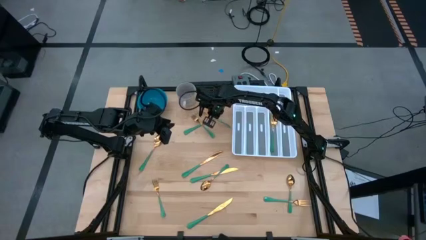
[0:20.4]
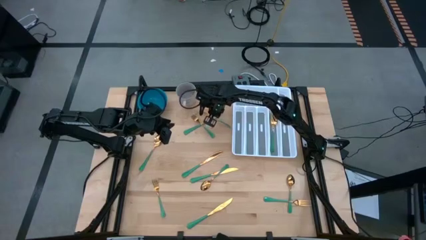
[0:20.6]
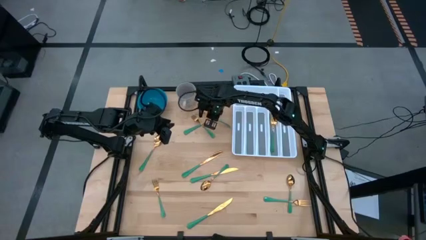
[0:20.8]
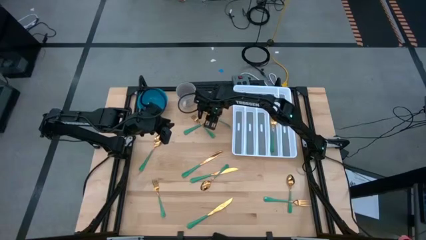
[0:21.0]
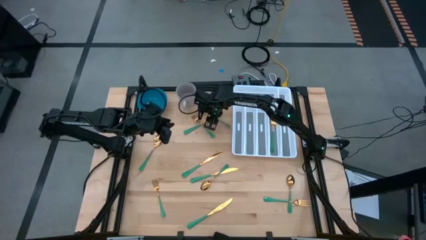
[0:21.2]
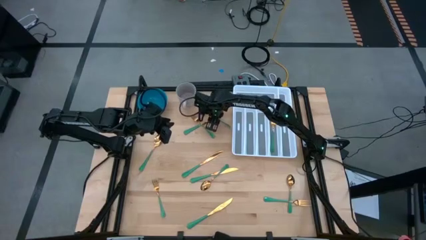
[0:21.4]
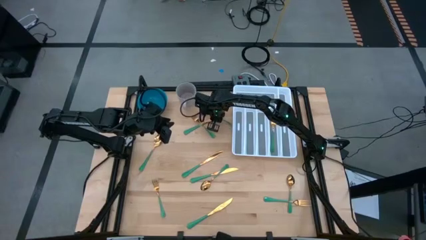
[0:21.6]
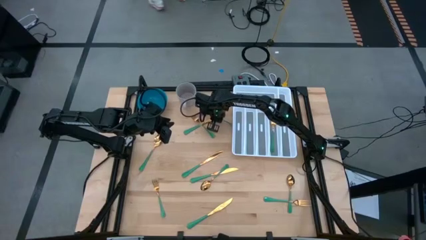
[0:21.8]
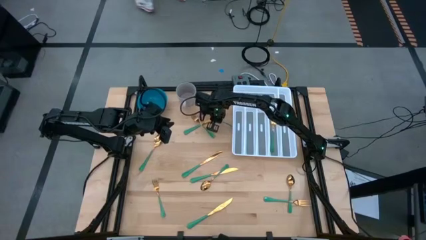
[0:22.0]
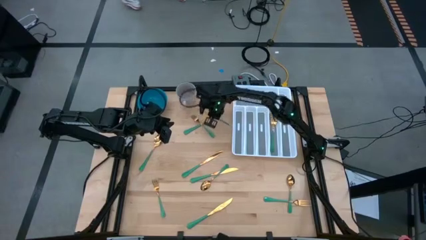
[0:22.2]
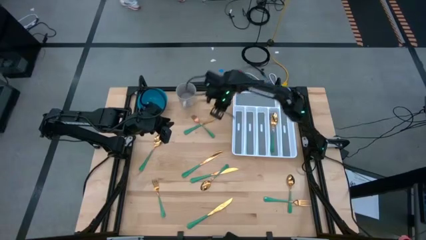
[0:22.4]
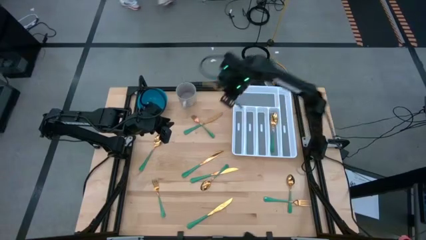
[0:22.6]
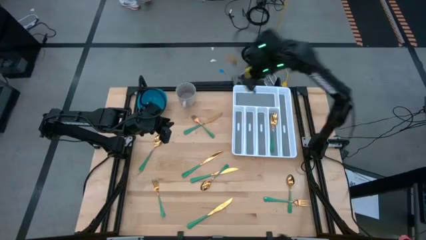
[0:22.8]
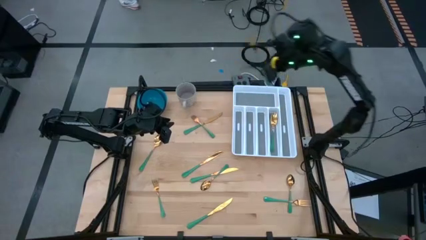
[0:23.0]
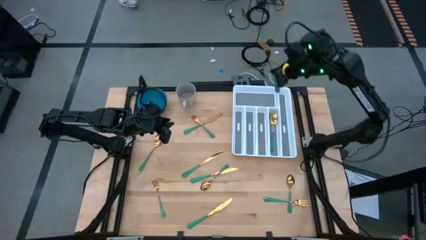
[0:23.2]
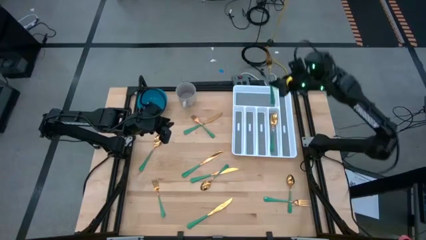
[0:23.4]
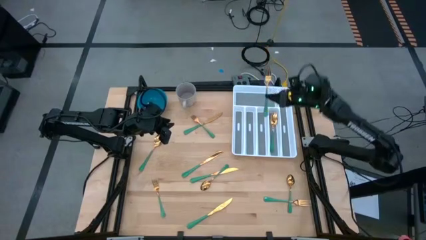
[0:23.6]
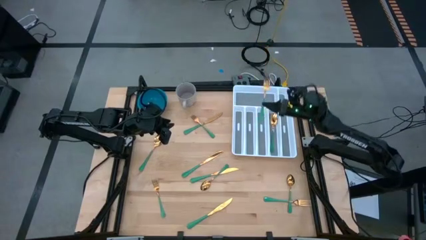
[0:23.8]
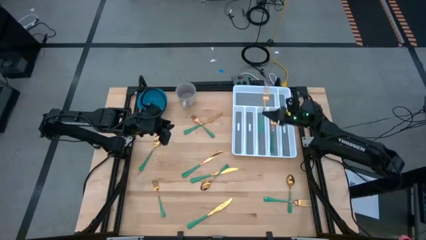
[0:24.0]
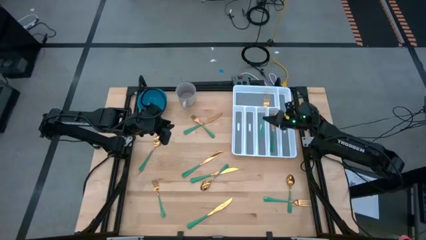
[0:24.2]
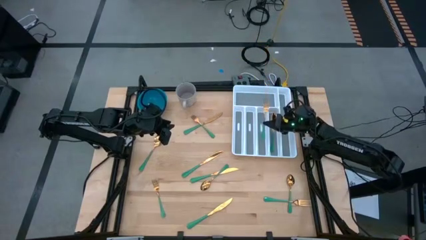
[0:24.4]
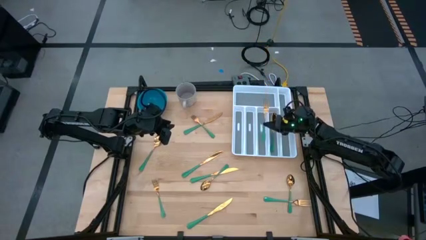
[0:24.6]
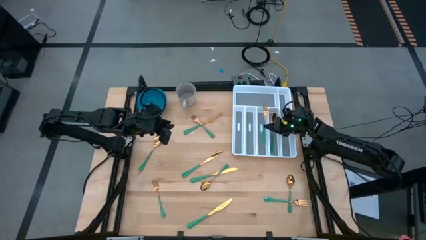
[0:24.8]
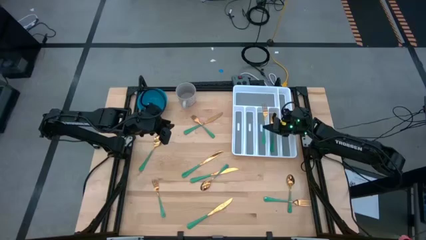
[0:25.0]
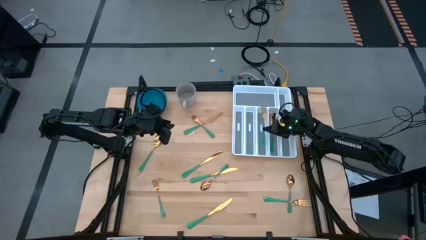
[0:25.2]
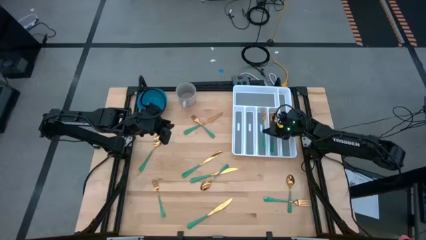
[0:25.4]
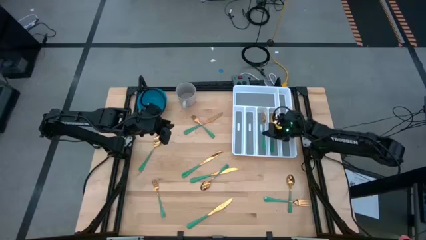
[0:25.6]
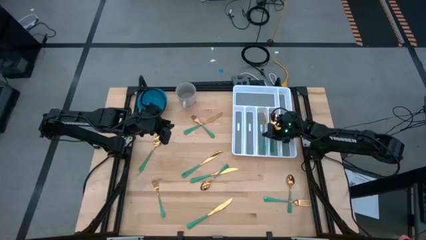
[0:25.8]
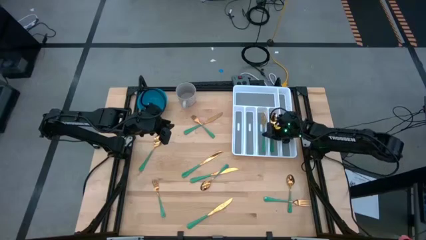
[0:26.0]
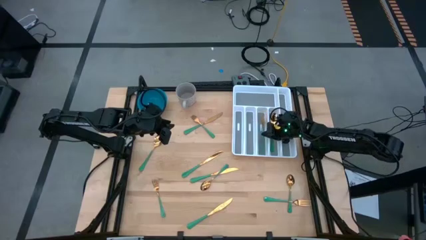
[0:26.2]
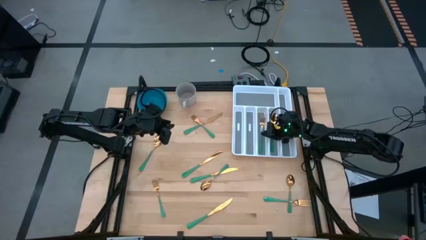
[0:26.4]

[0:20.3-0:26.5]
Task: Sort silverware
Put the green fork into the white cutlery tray

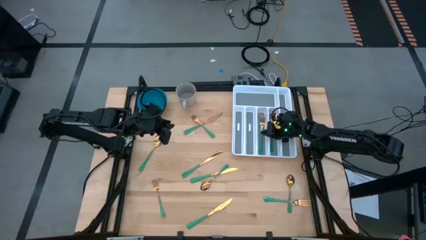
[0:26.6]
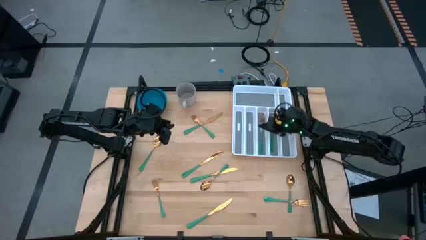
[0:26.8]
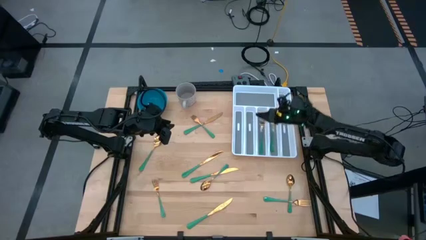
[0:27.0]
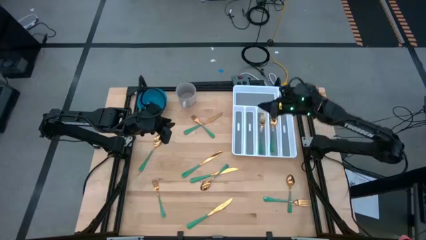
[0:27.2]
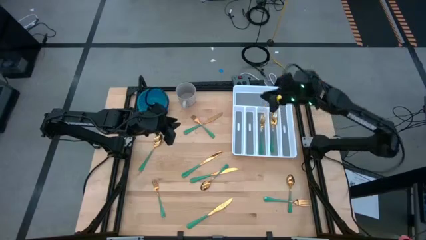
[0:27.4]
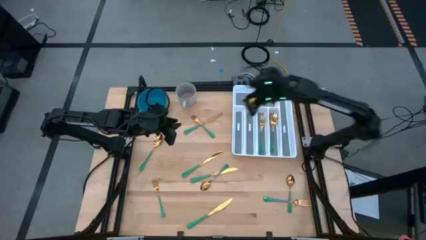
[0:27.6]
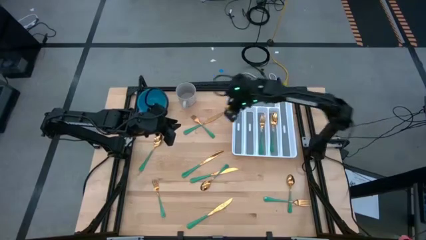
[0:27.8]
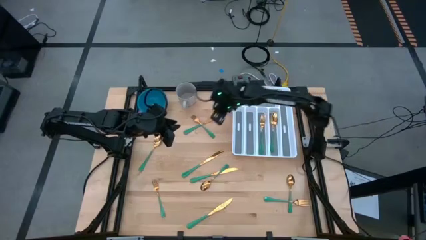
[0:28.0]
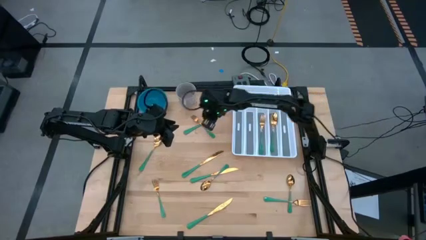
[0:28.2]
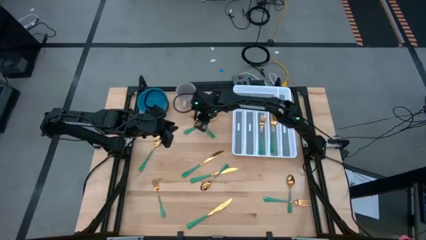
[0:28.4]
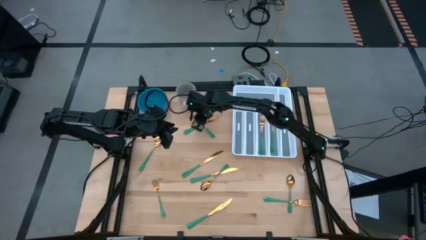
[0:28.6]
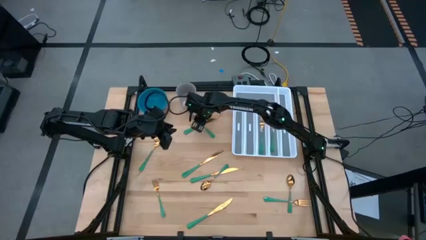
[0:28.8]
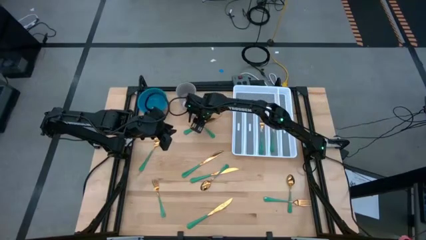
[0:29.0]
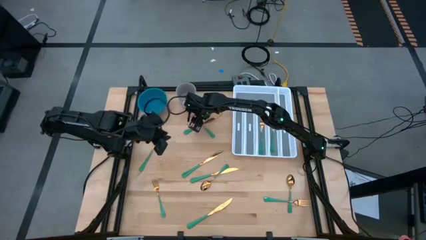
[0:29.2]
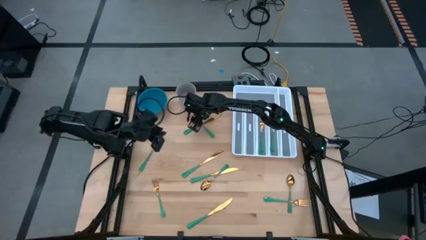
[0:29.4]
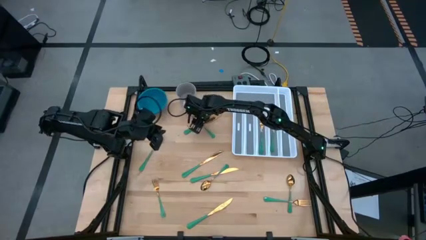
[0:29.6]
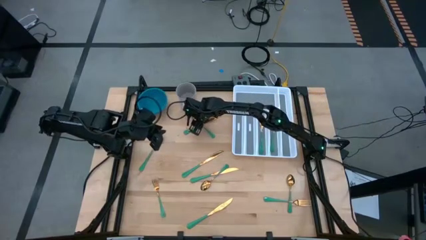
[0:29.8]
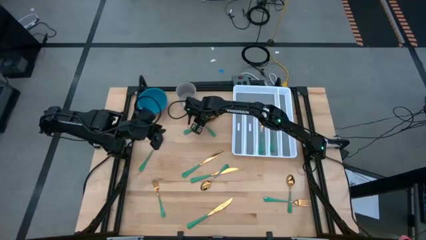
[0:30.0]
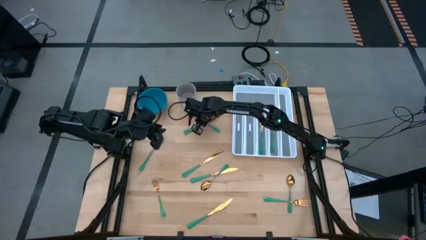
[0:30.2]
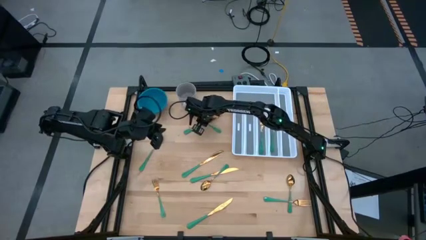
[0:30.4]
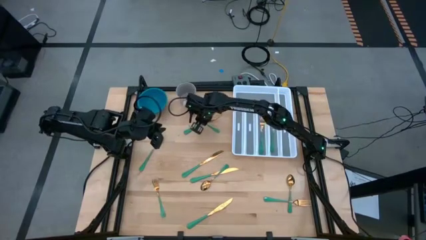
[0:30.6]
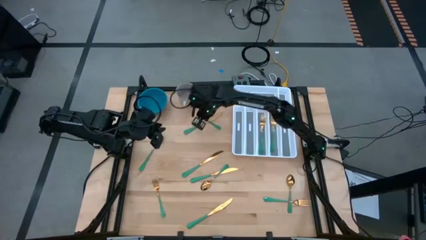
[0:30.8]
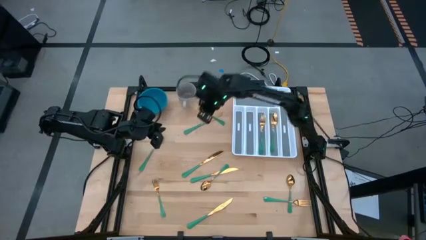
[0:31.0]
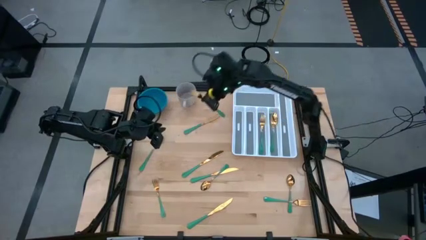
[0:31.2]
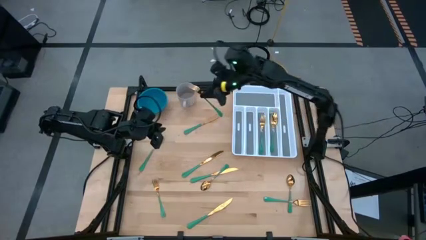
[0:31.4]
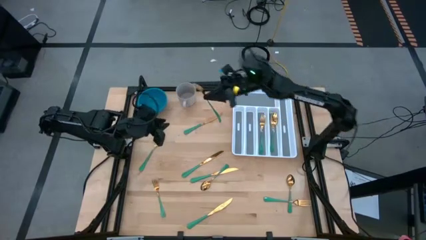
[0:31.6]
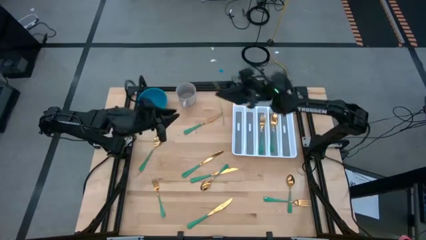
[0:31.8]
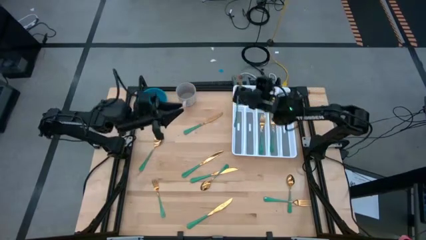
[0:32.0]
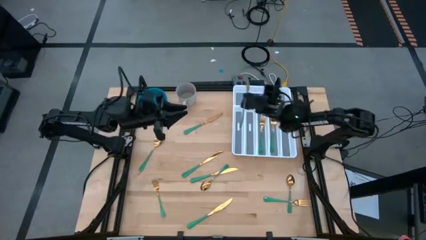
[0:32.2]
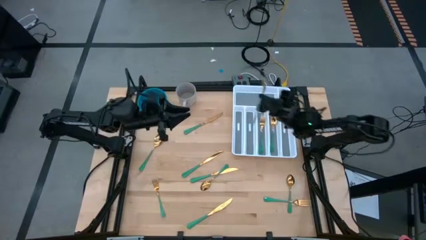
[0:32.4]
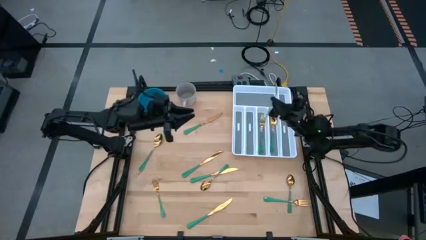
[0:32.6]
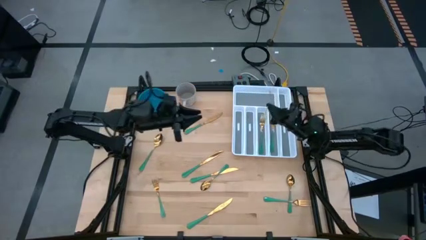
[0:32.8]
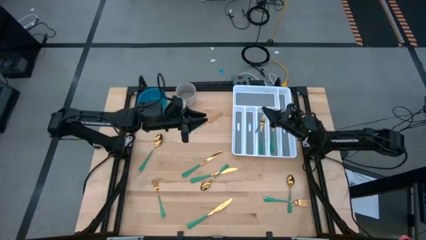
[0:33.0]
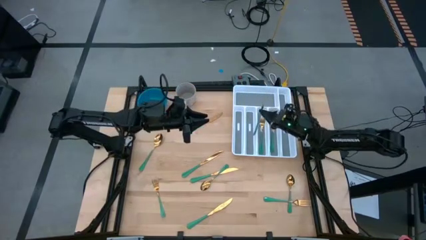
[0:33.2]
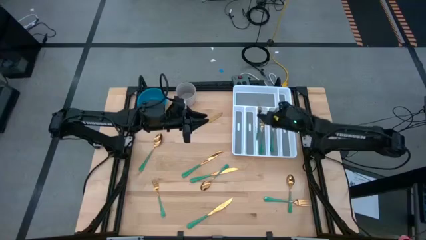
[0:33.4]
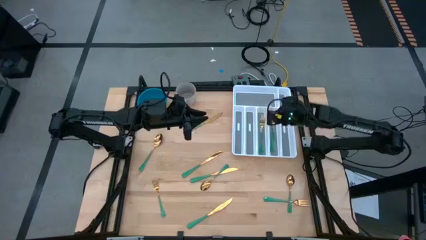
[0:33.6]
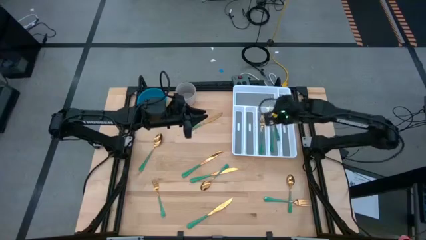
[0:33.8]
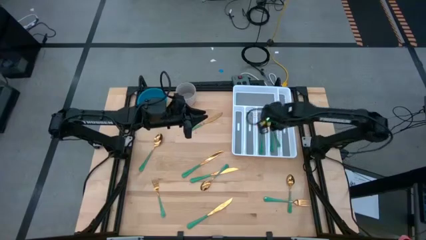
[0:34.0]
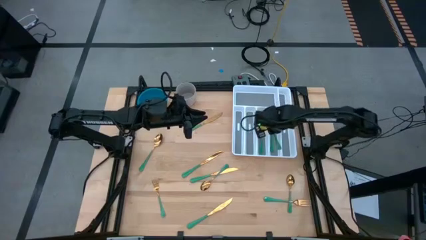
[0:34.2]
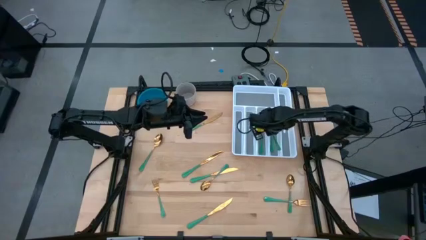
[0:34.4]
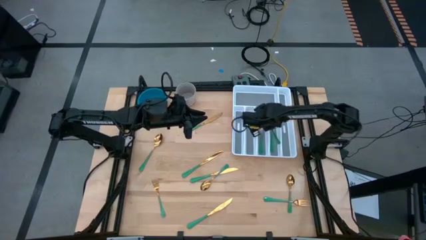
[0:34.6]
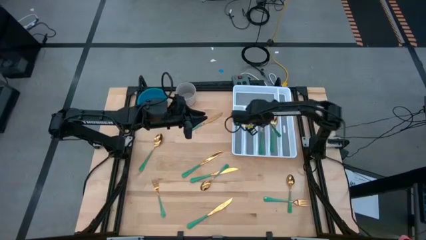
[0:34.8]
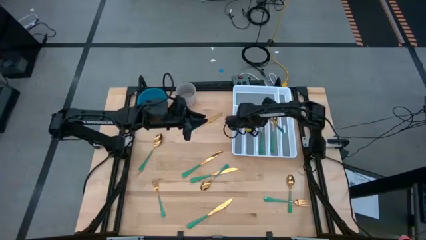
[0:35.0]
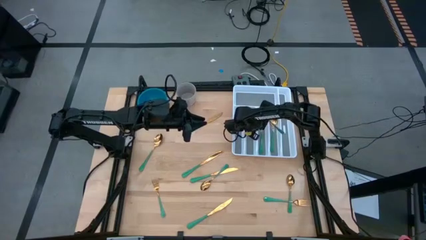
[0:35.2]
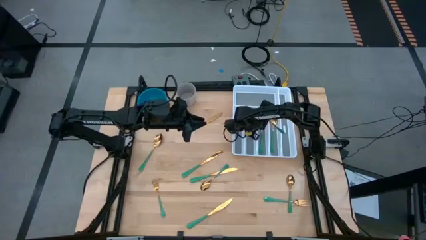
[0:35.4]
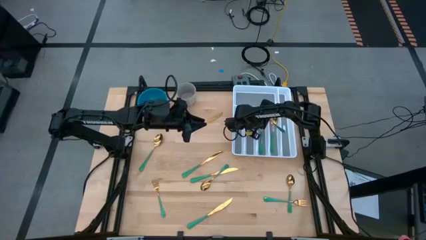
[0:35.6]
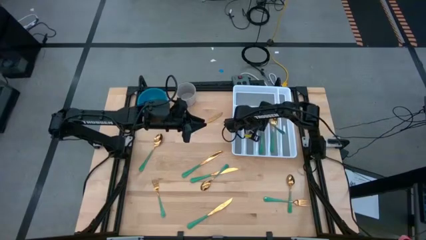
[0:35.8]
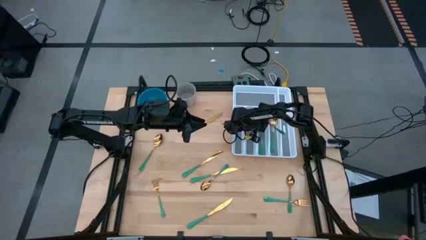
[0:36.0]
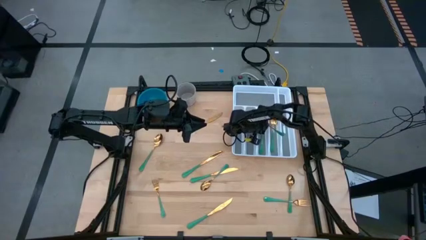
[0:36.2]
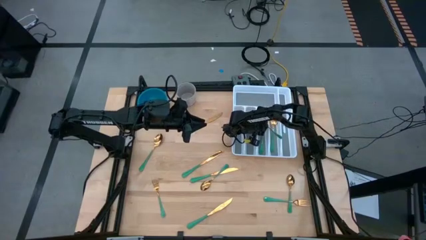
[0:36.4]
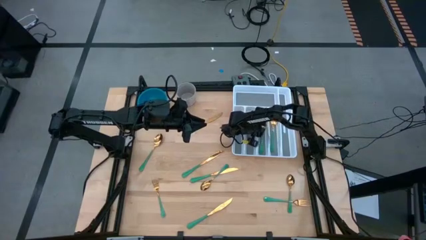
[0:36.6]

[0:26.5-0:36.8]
Put the green fork into the white cutlery tray
